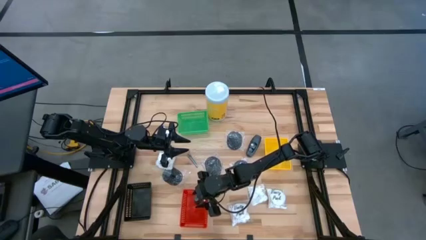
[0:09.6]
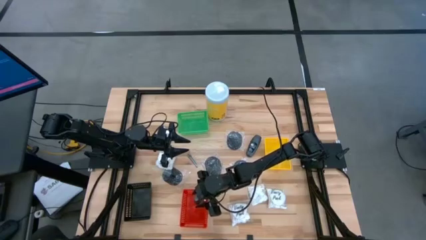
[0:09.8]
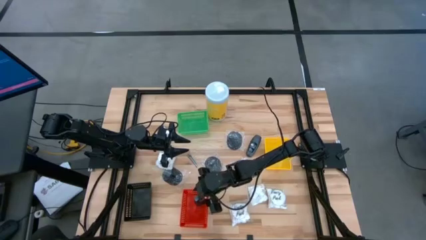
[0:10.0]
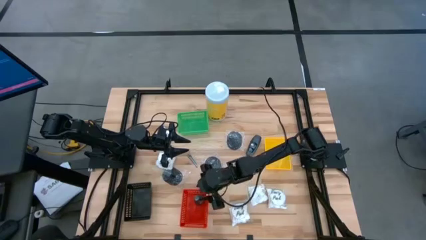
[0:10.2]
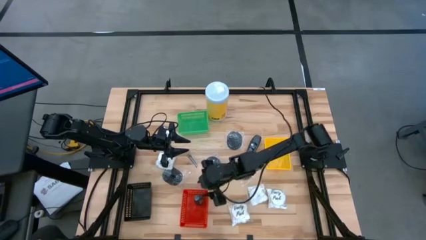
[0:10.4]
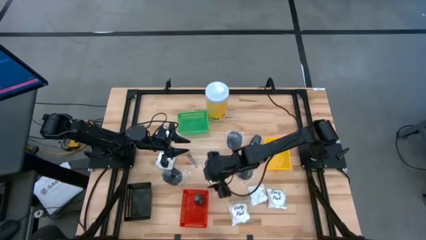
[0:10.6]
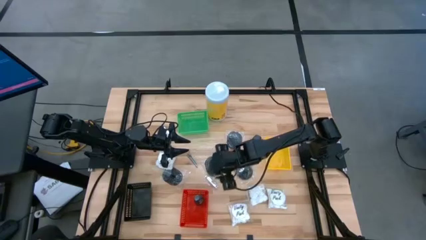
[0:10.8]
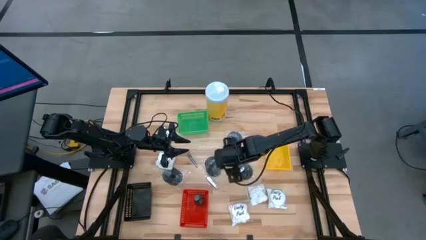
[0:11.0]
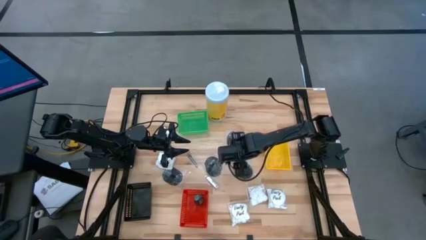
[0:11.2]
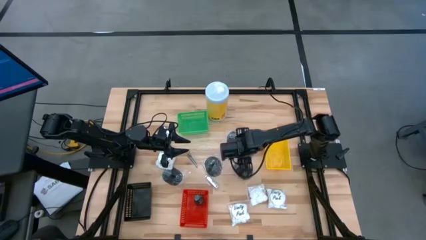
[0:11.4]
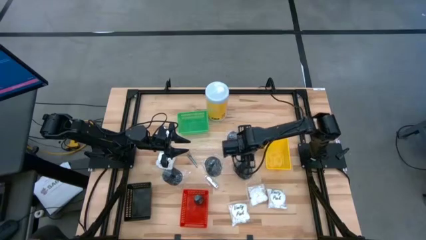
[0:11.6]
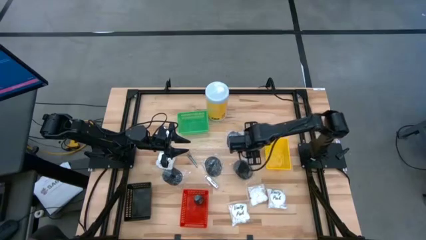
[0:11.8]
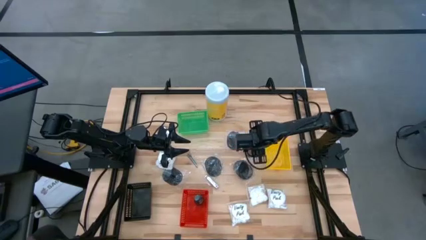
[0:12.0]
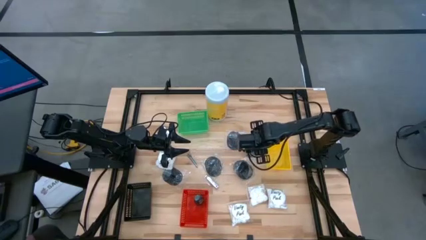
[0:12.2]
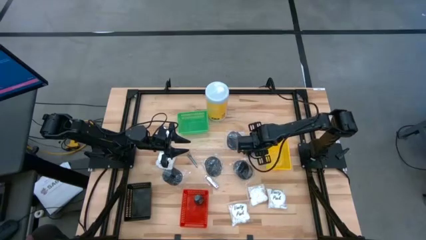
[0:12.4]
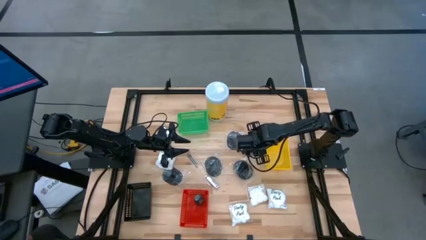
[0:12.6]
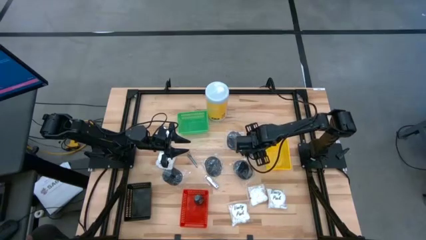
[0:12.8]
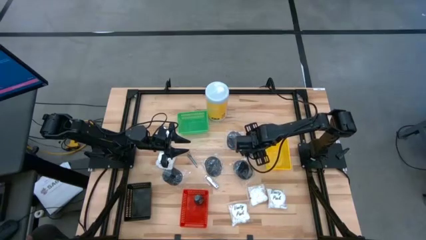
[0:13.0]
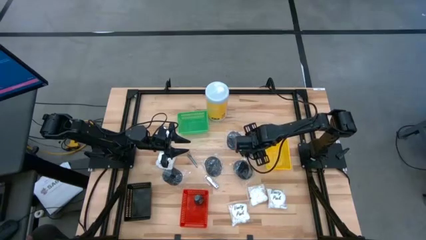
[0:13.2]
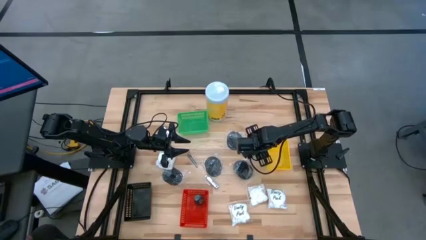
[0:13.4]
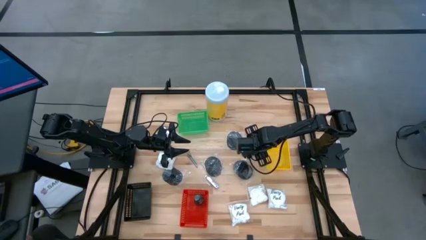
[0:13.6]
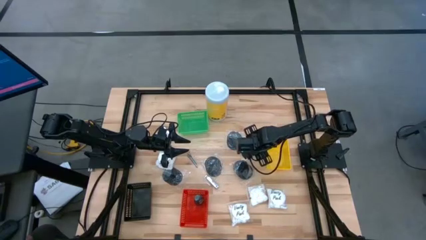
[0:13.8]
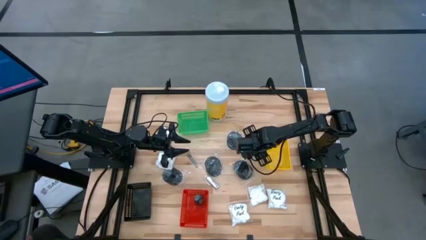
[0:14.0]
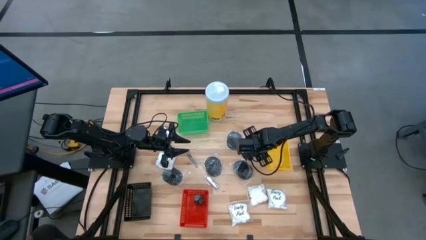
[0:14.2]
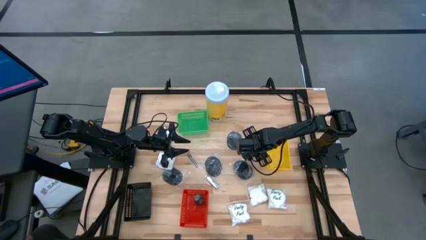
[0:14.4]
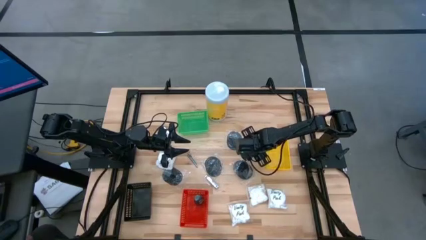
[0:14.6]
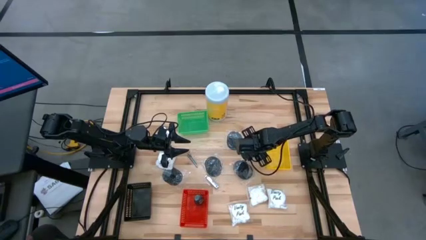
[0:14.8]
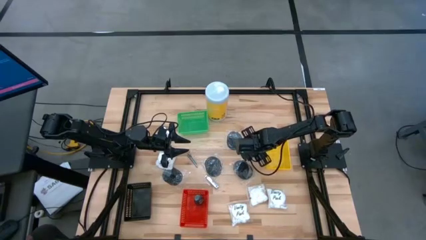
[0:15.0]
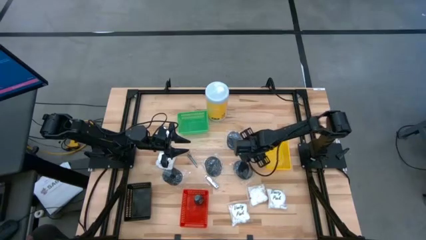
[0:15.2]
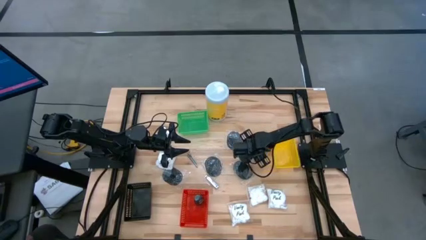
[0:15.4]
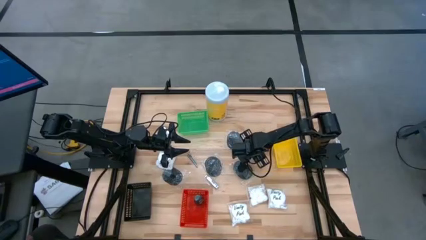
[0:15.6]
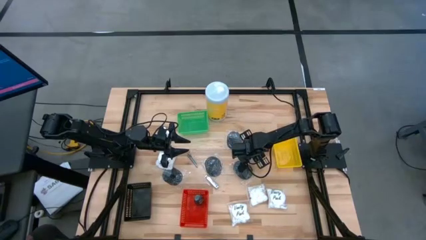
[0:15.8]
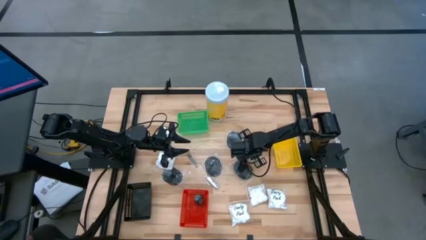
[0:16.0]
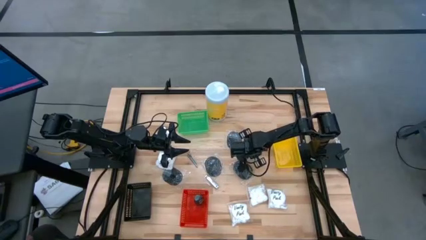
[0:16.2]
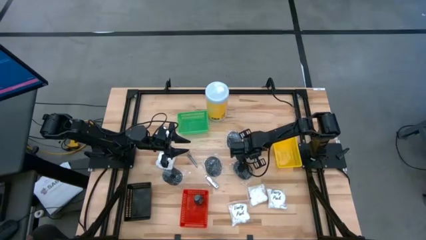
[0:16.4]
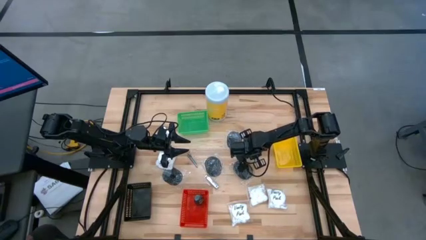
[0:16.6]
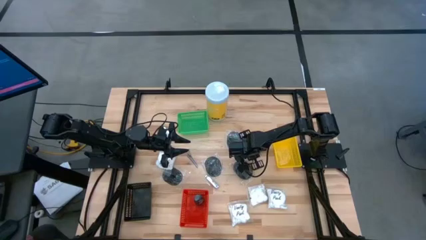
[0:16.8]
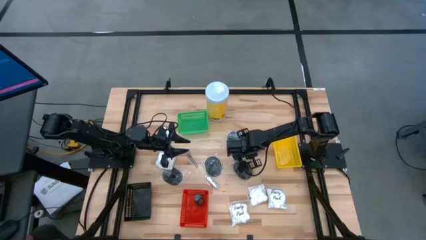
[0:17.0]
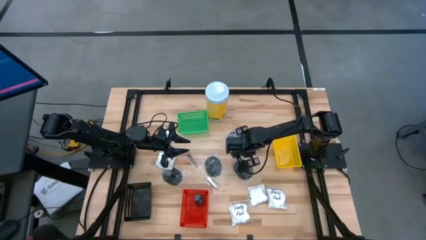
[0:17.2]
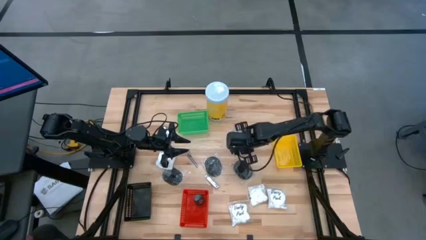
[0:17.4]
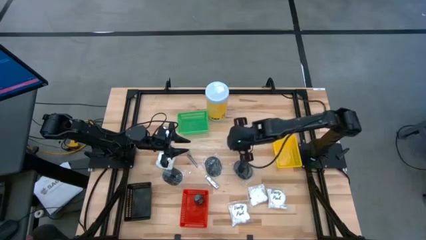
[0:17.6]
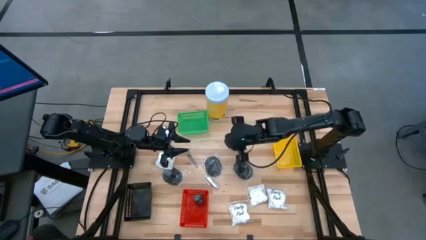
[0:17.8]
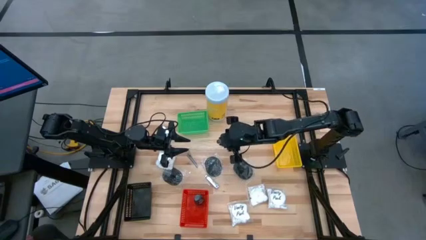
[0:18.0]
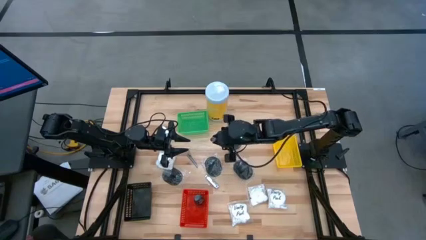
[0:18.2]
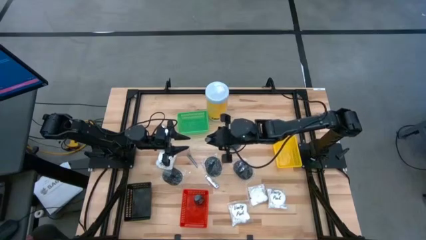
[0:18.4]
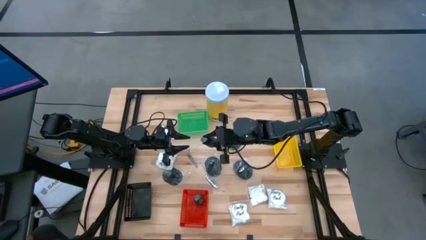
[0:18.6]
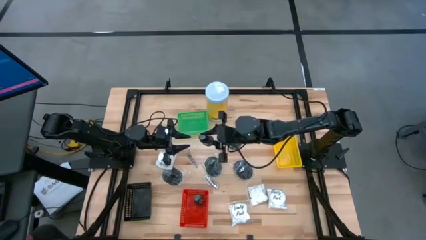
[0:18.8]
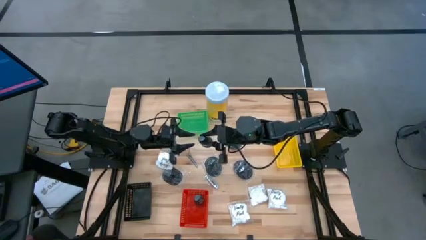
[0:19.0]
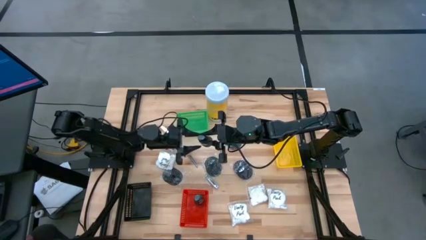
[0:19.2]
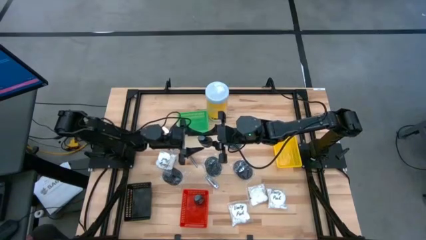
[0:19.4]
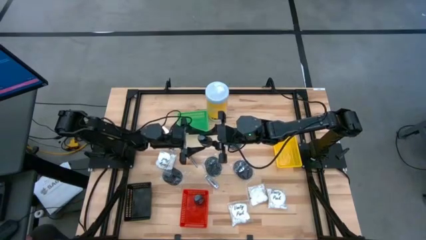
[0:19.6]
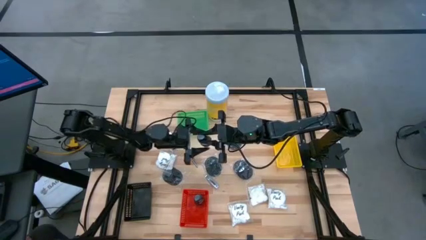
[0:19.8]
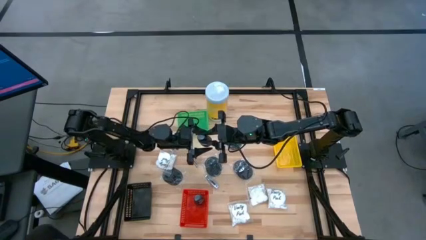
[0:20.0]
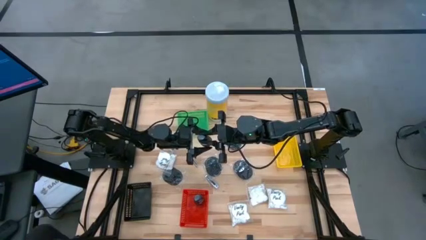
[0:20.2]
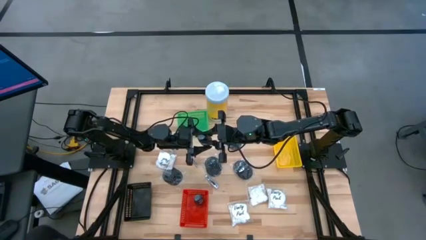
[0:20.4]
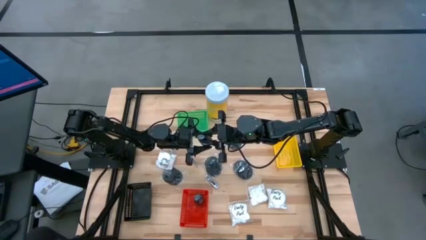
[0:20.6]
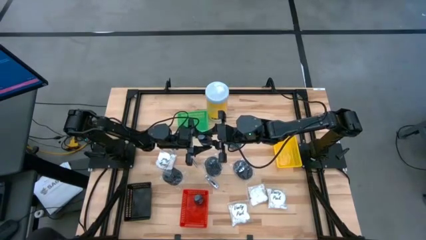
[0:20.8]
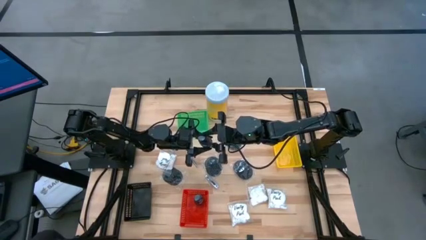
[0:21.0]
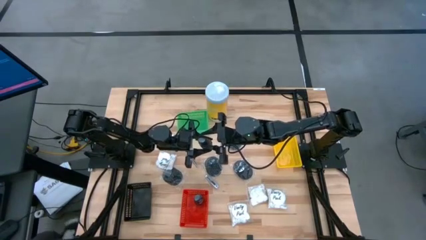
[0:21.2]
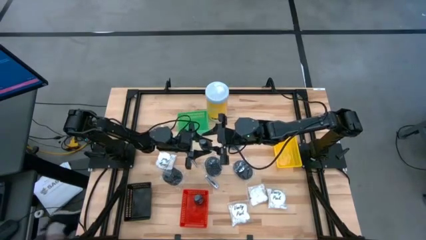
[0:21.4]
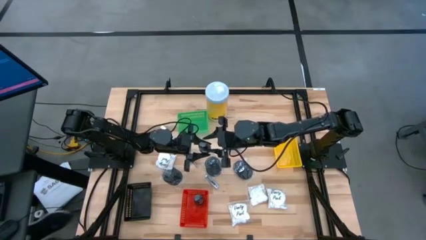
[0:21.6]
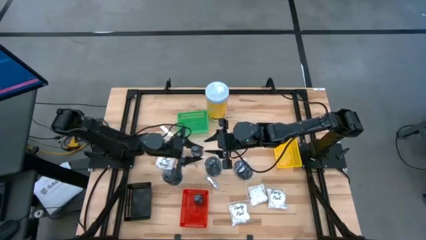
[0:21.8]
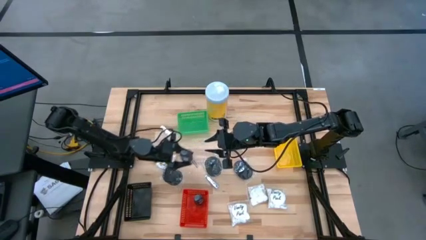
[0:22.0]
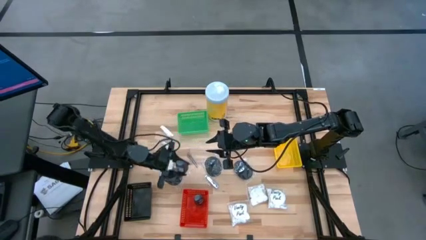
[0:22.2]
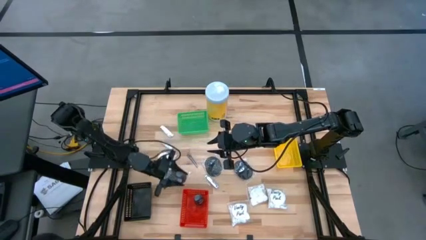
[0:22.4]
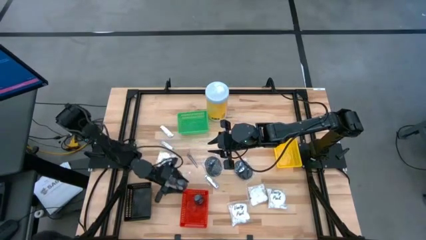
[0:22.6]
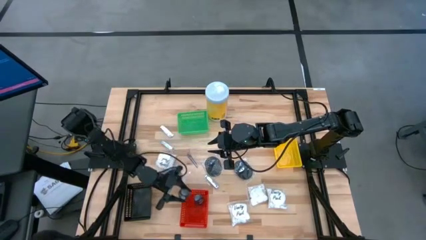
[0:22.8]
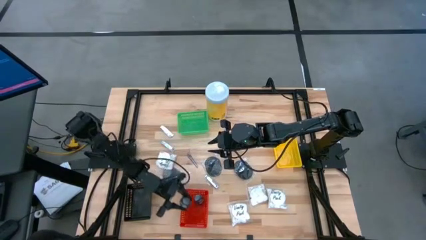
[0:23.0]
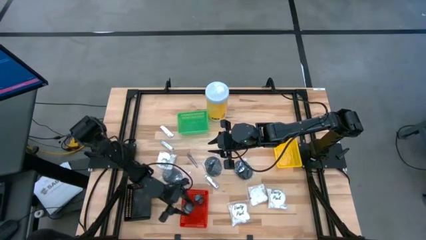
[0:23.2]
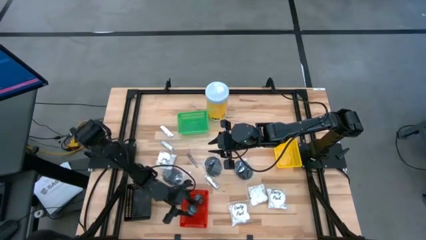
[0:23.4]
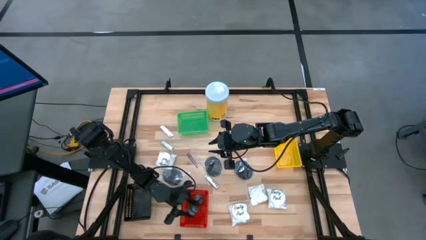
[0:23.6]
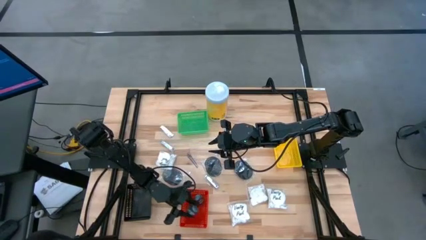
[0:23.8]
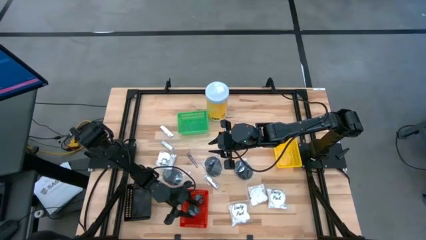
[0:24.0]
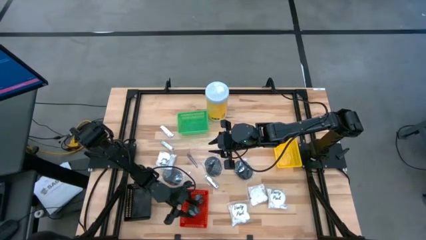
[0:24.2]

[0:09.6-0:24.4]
Task: Pick & Place Travel size toiletries
Put the gray deodorant into the red bin
